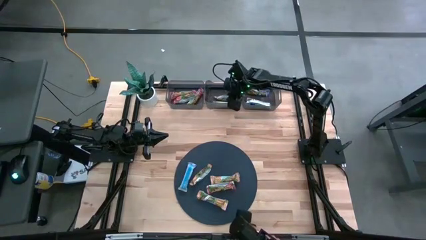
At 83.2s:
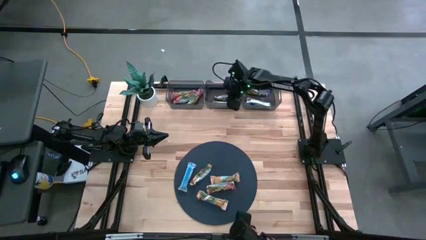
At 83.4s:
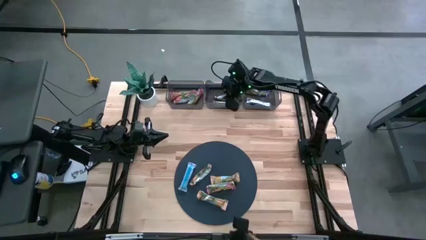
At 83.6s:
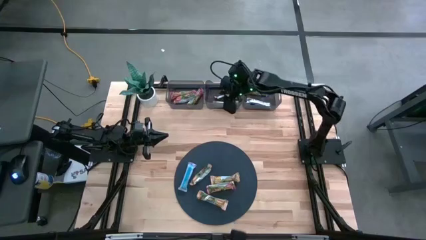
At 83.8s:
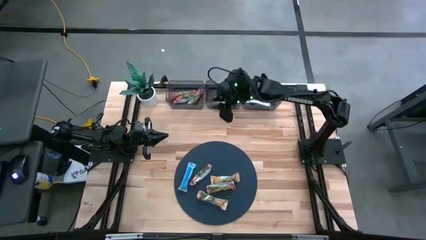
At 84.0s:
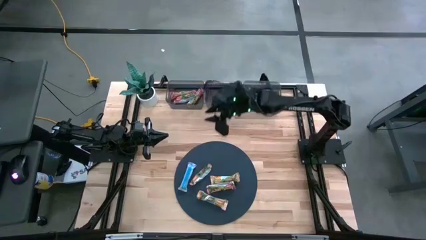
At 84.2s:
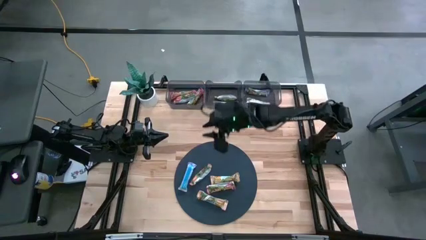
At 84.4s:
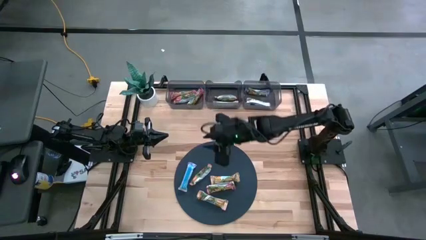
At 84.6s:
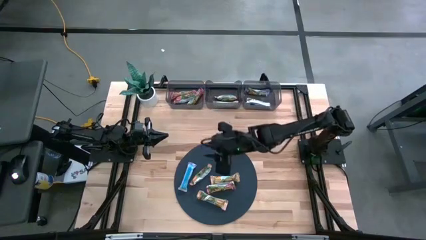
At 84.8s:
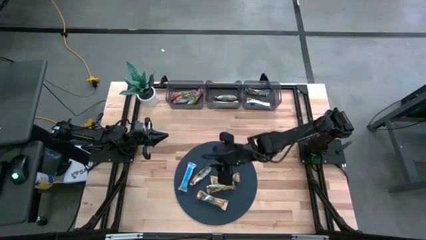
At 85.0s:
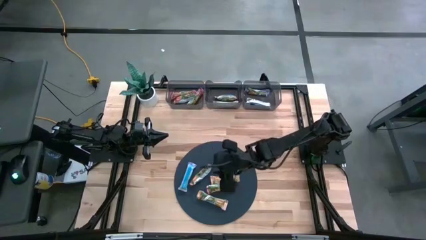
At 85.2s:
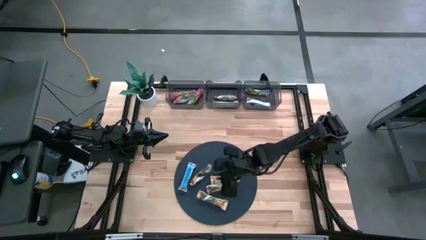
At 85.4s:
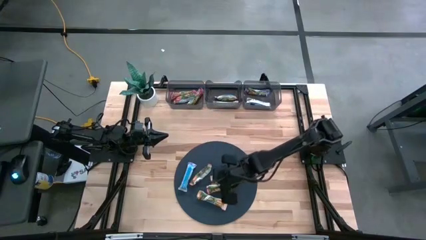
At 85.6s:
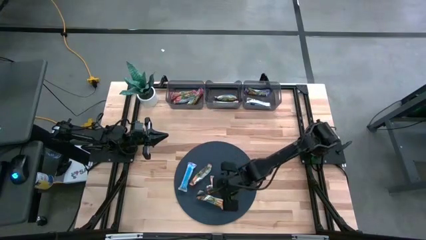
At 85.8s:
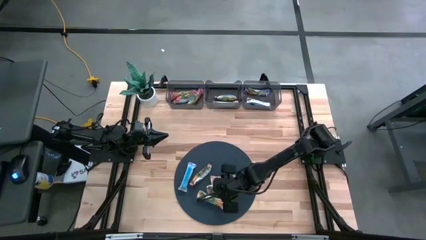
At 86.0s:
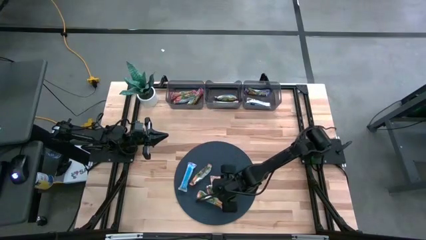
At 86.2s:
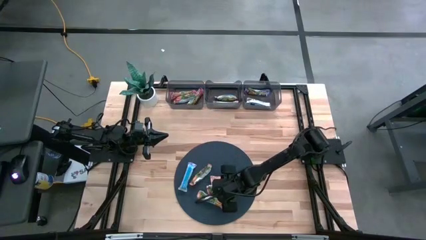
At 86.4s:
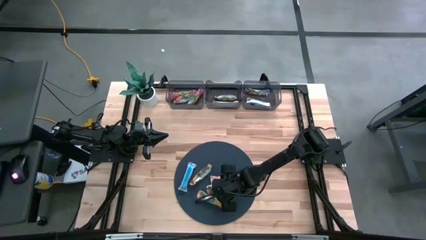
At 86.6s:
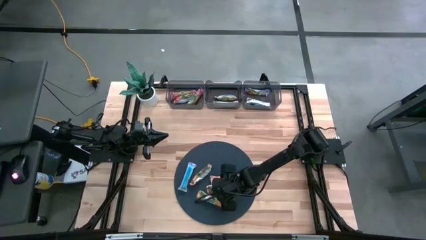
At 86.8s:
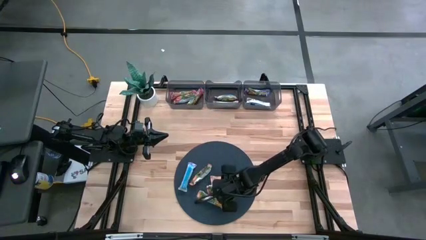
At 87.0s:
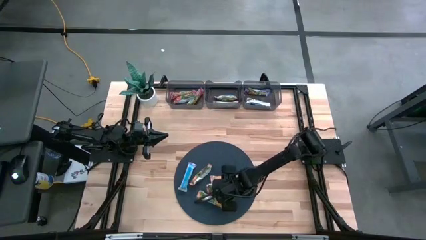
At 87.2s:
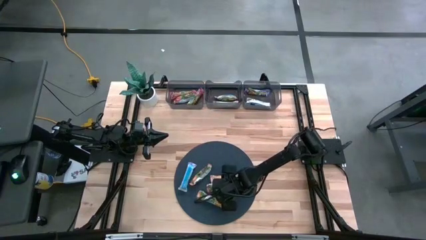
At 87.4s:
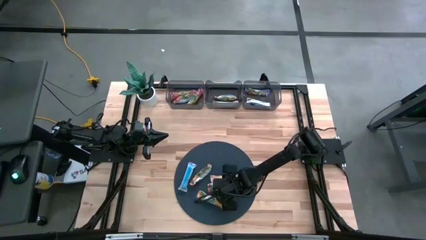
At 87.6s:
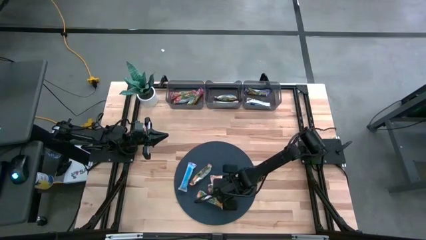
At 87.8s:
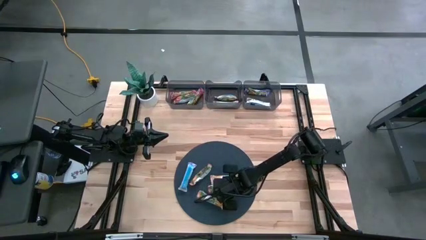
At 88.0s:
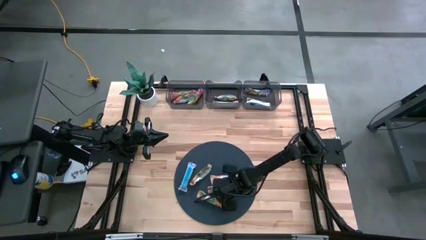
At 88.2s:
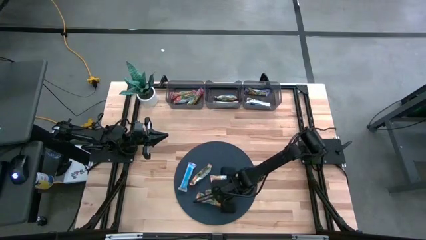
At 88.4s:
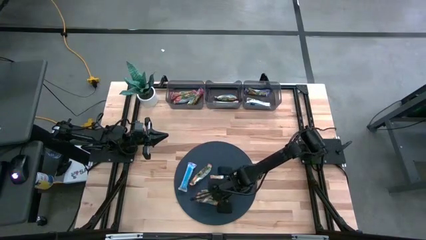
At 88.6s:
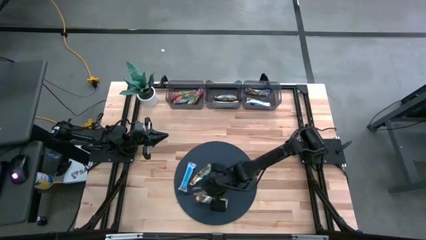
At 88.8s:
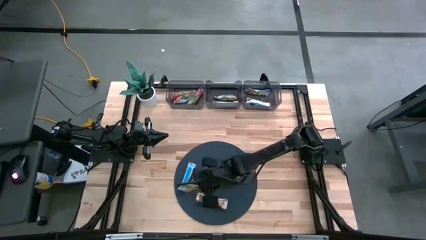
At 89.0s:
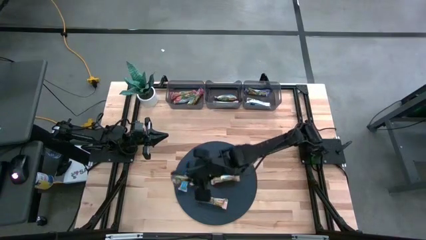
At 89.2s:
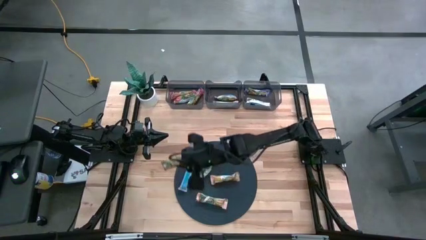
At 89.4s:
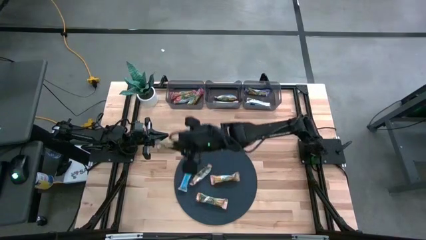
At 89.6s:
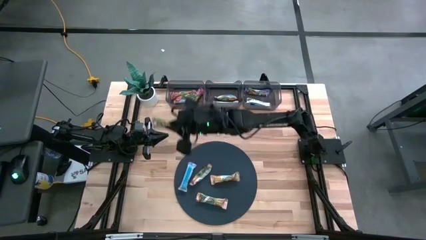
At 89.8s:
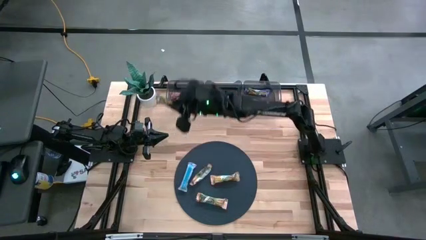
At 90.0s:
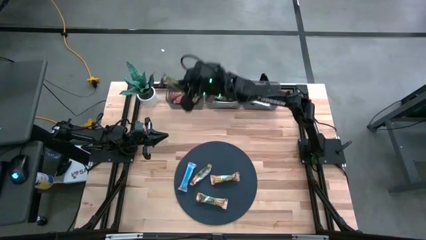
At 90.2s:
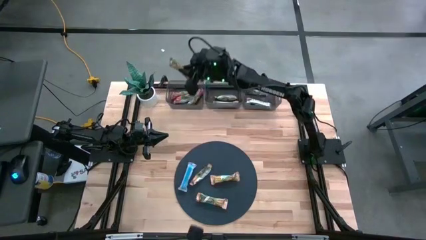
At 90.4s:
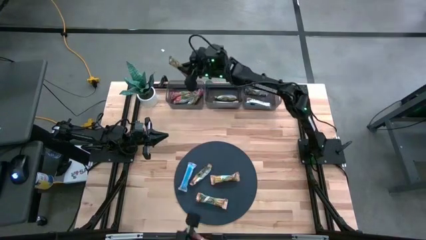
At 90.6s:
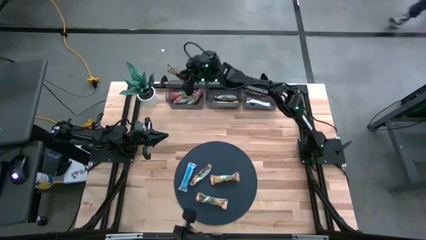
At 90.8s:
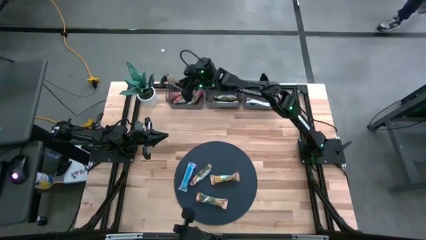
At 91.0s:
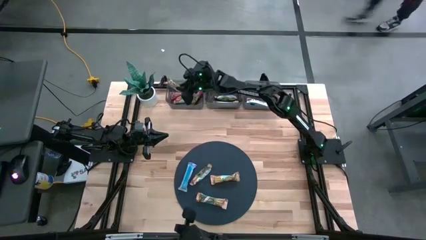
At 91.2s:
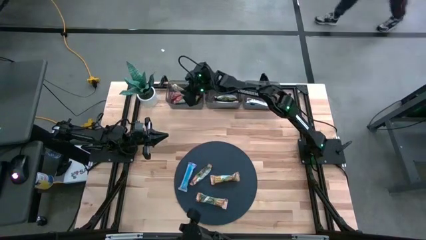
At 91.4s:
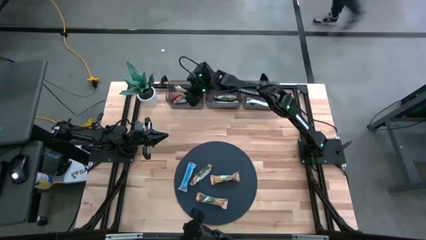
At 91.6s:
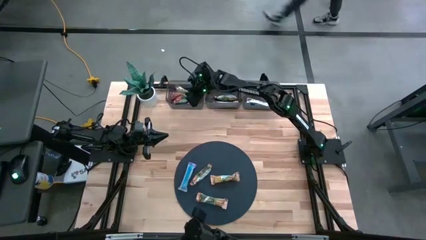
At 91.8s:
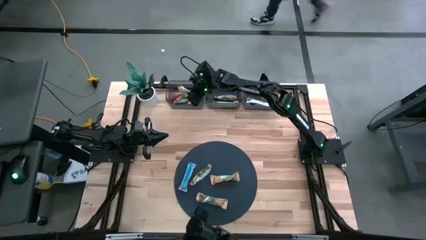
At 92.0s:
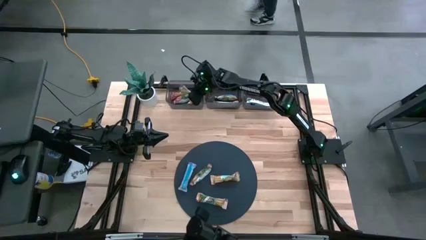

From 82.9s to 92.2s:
Task: Pick and place Granola Bars by type
Put the red granola bar into the left black bin

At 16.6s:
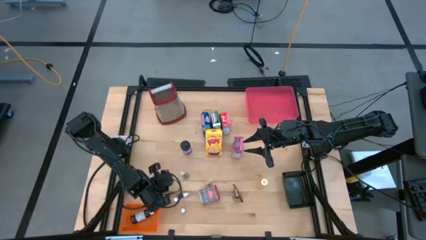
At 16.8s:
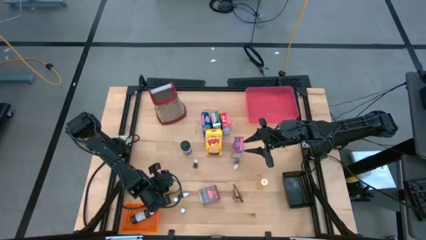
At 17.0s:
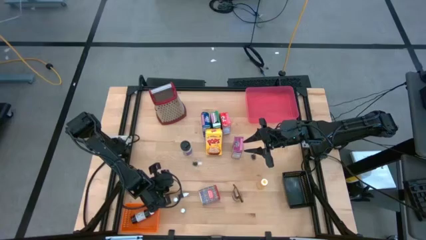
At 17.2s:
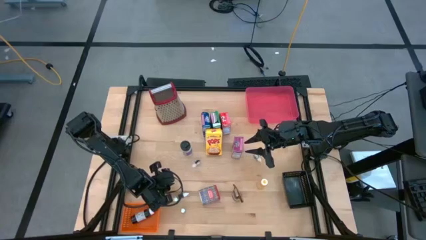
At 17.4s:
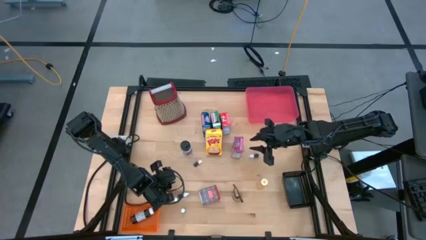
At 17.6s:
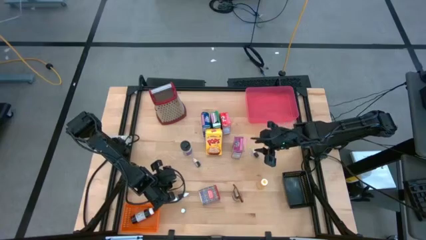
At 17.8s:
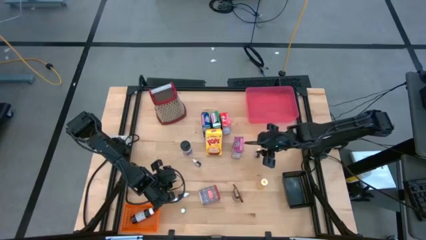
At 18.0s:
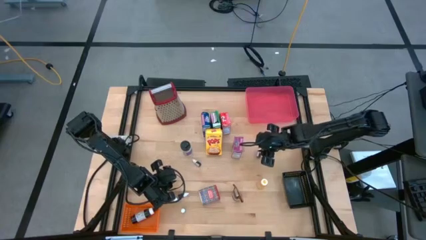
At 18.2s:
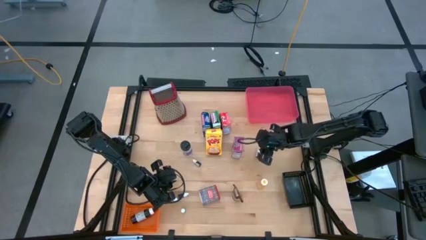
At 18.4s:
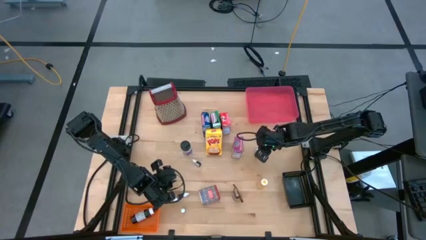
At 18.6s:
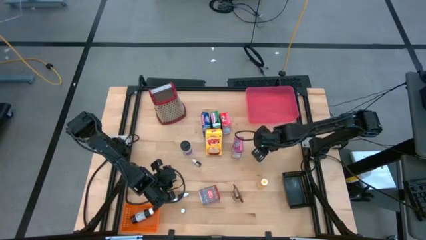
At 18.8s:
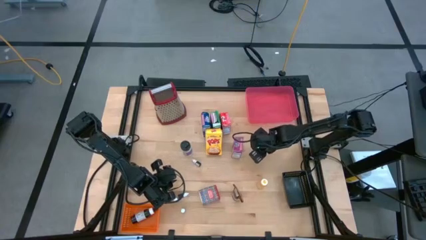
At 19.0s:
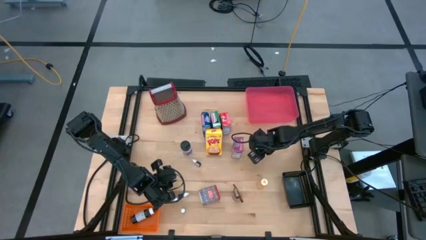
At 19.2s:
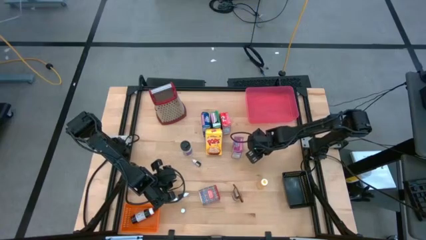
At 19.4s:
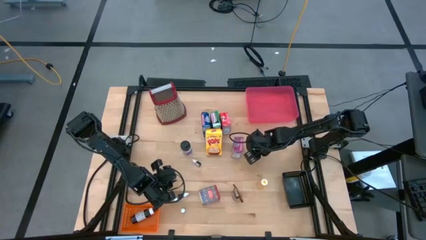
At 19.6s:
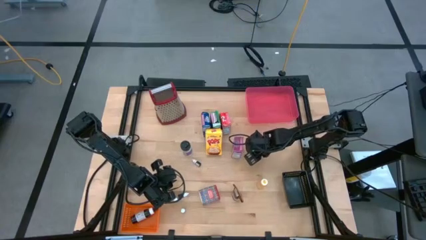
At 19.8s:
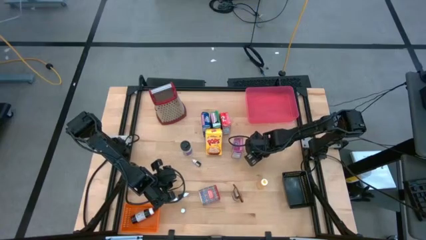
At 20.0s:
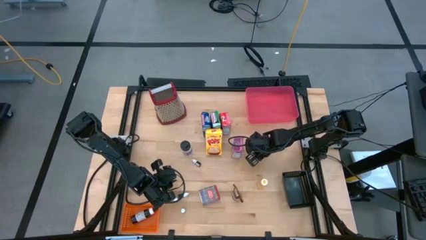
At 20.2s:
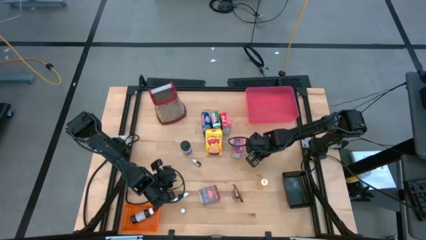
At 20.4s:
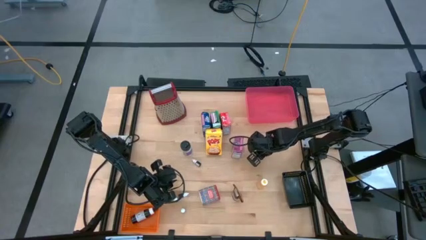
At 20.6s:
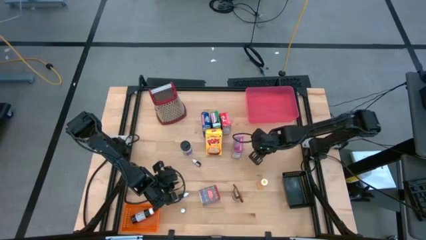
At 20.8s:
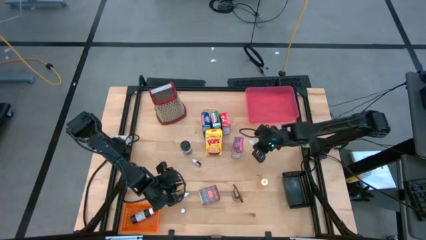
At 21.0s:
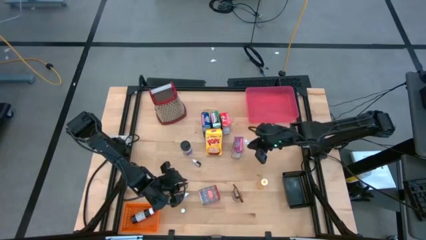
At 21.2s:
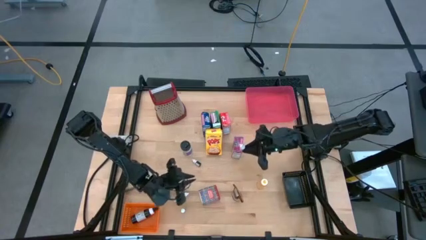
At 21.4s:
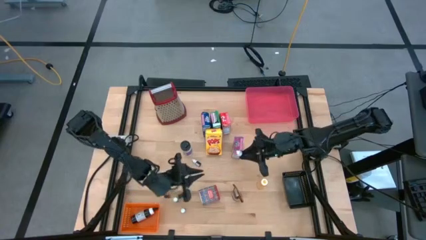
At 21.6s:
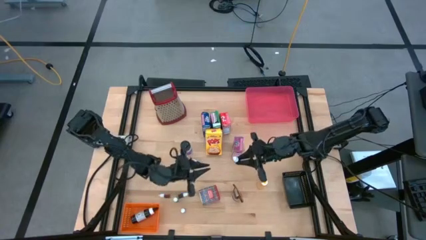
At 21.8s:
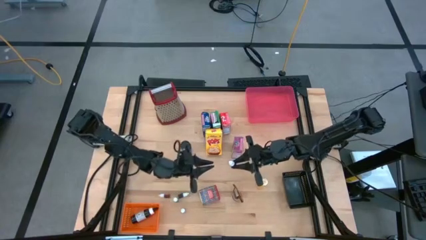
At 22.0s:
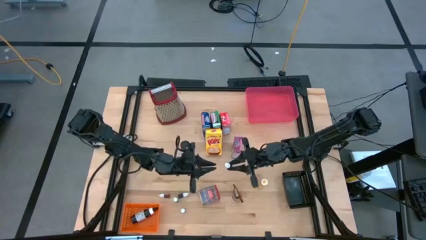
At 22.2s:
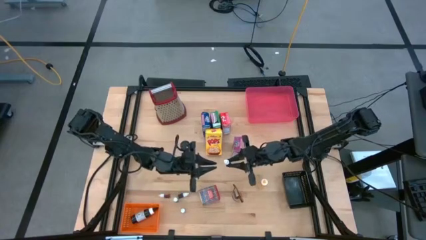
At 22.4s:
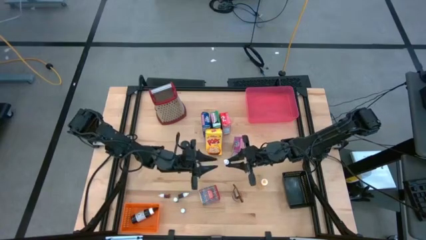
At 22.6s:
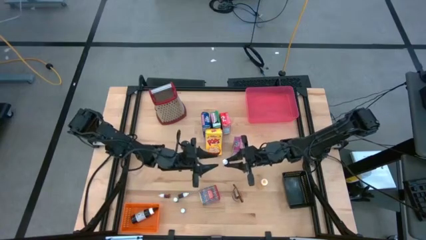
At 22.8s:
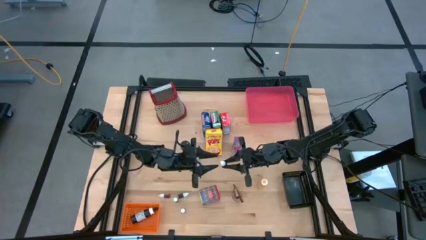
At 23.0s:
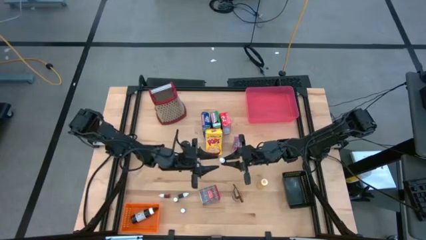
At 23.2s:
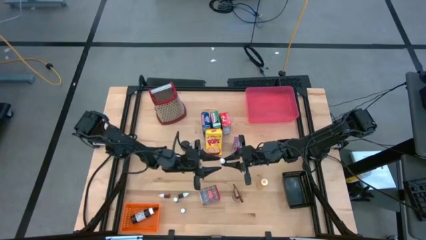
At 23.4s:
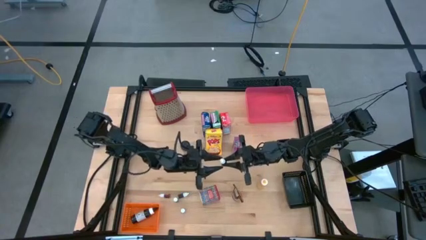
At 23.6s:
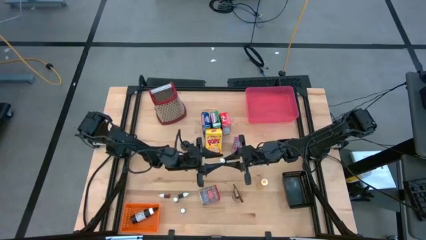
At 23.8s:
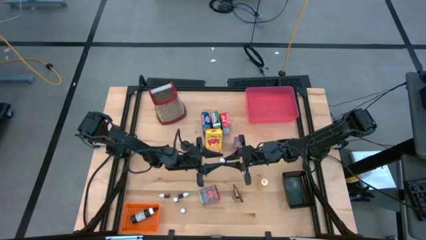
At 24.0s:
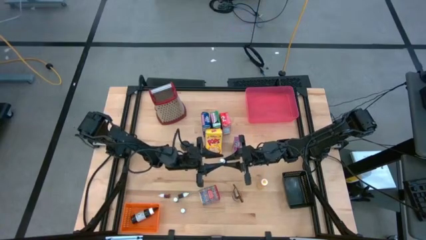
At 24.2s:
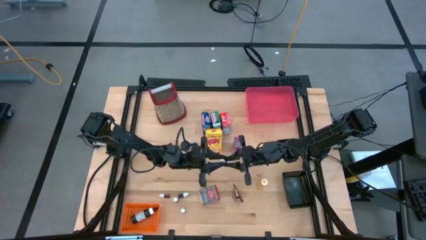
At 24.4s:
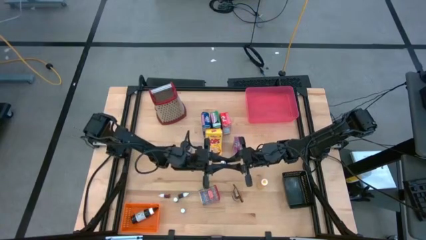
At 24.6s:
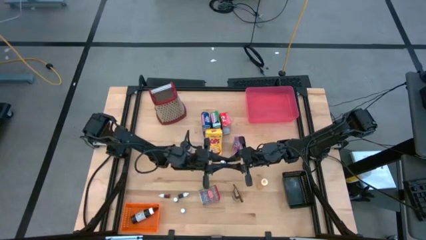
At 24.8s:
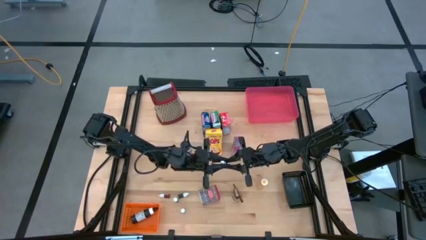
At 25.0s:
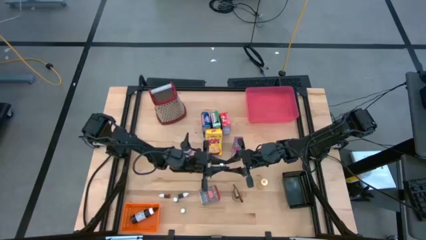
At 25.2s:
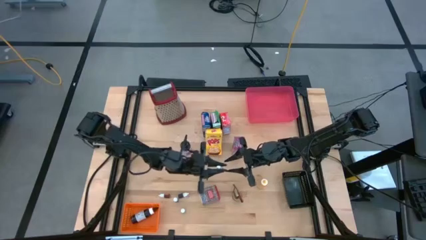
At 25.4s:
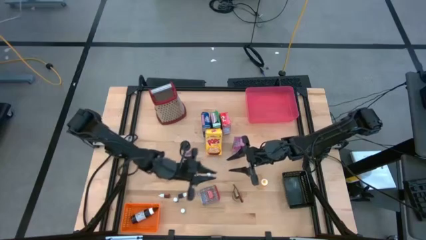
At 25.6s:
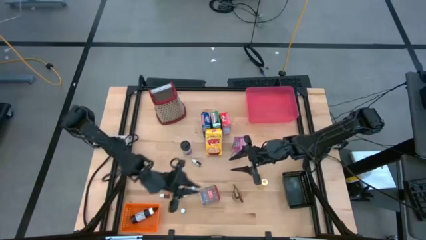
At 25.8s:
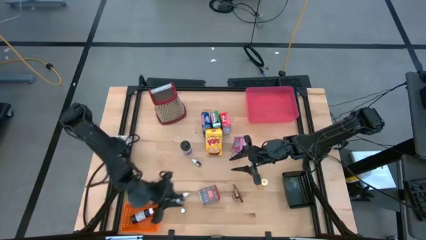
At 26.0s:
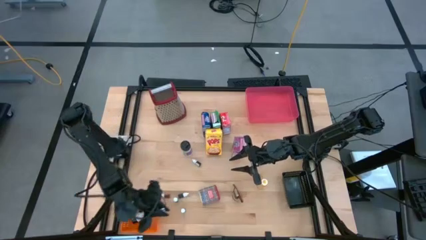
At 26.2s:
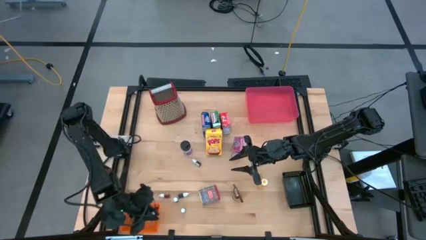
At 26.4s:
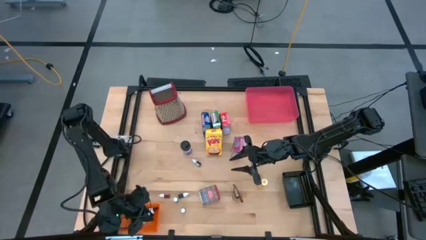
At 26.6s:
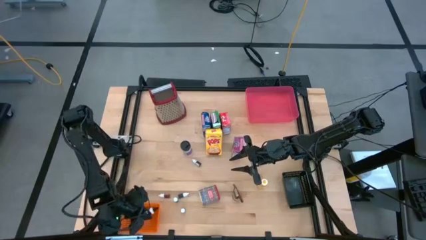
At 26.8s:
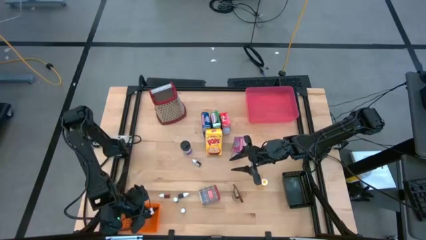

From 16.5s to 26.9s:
Task: Pick & Place Kitchen Items
Put the small black food coloring bottle into the orange bin
